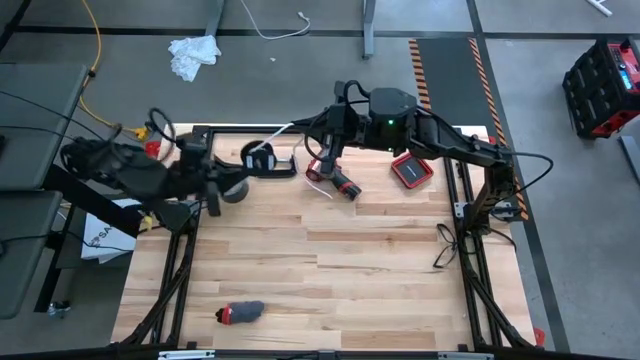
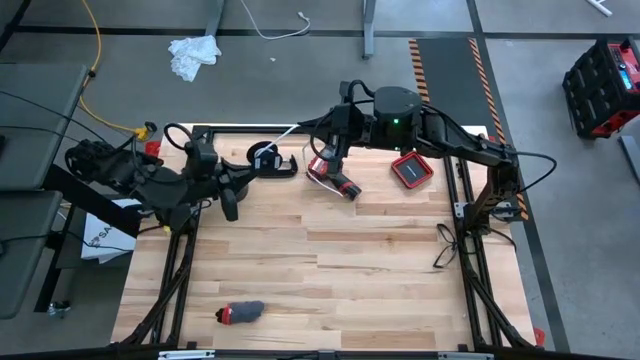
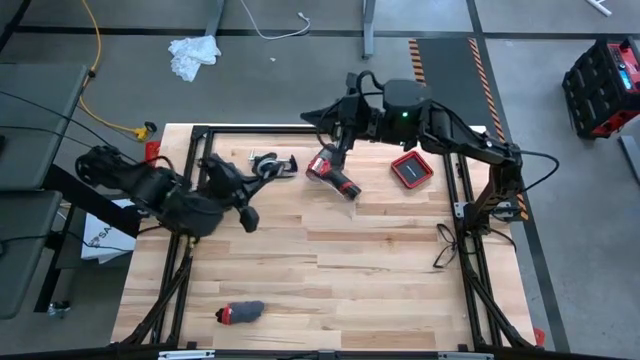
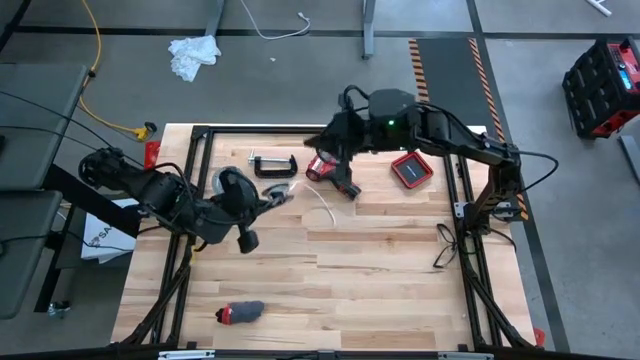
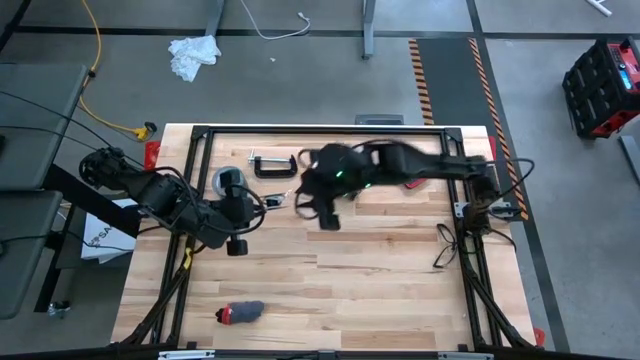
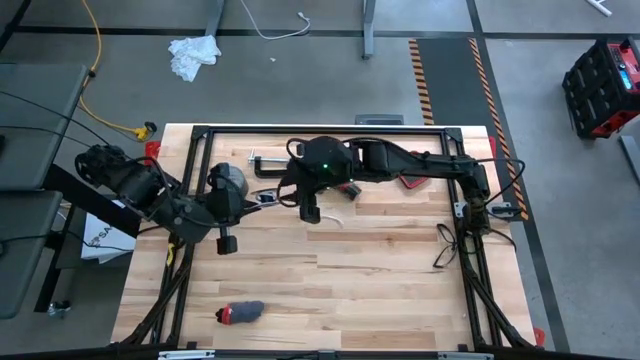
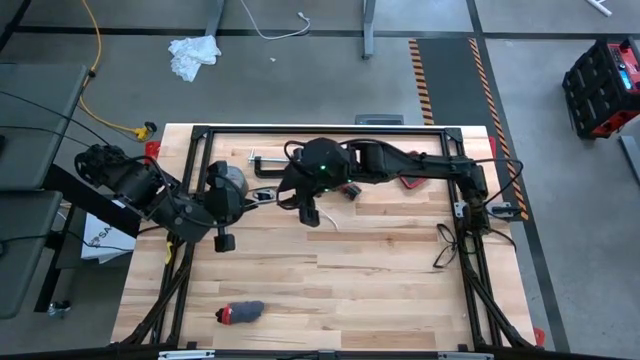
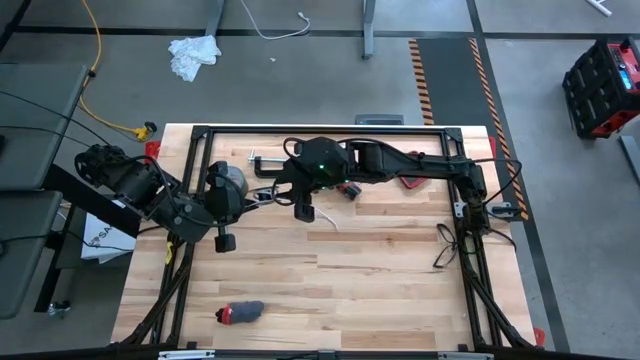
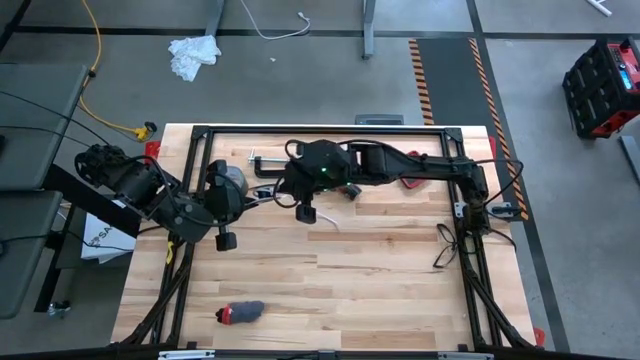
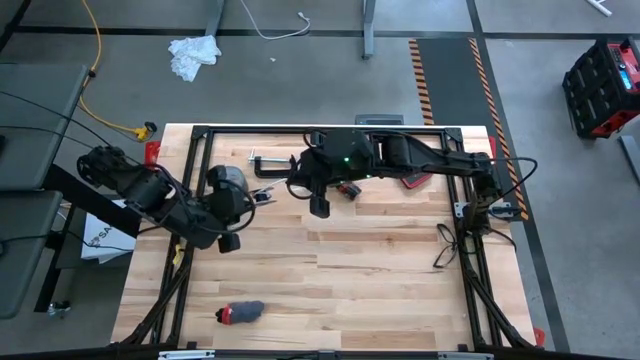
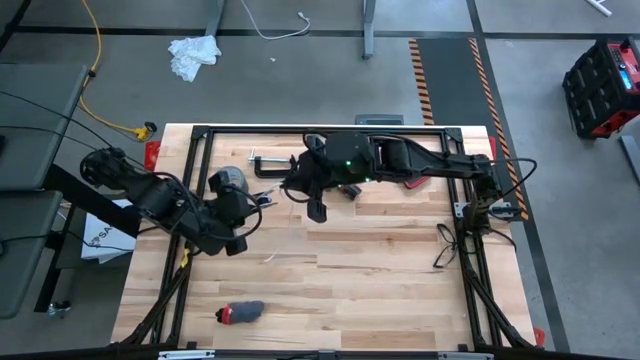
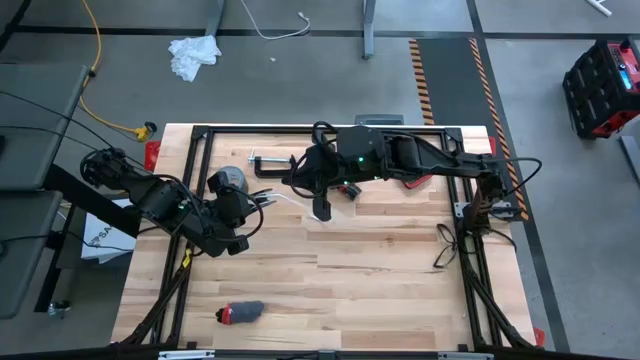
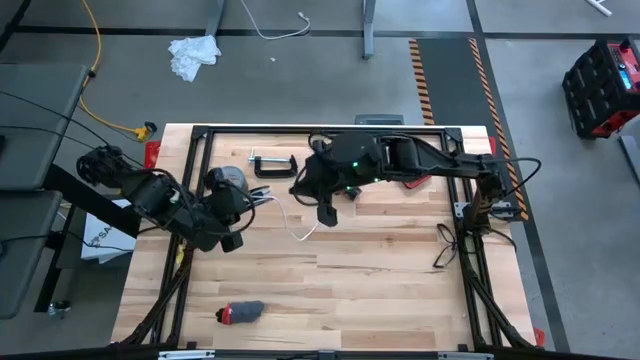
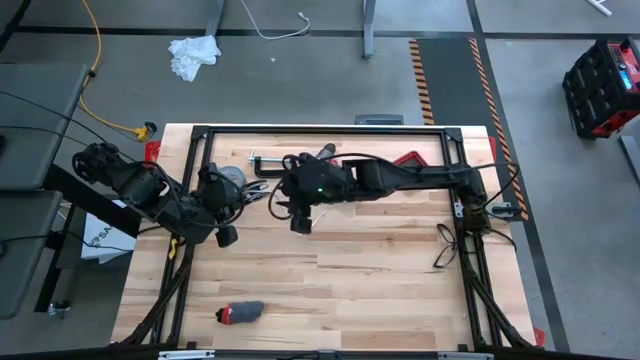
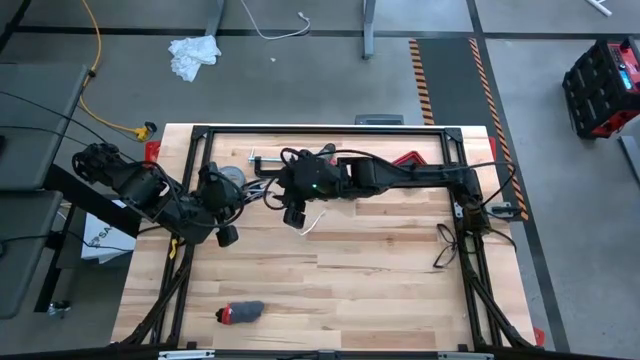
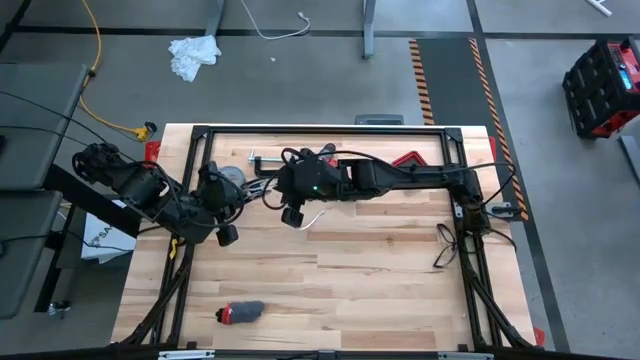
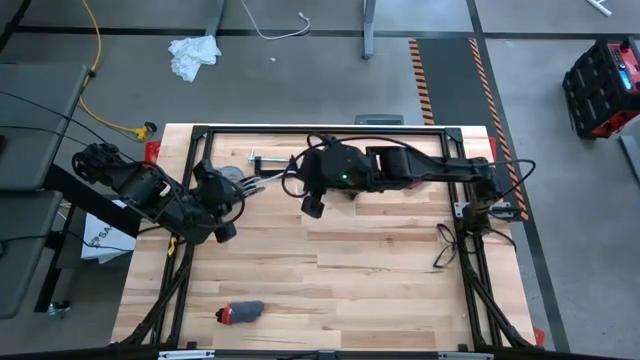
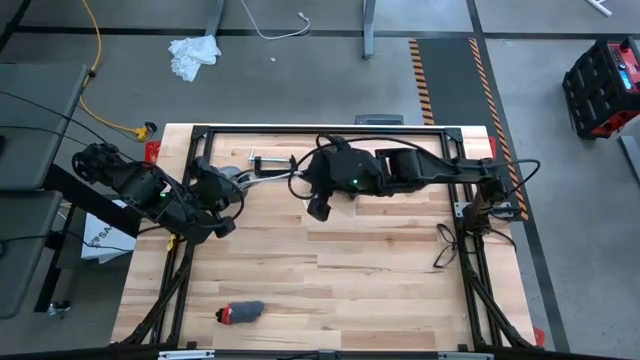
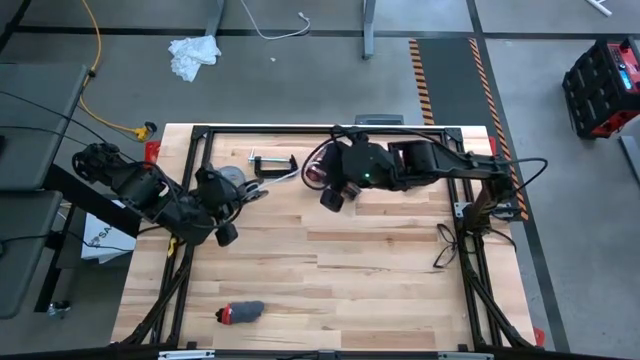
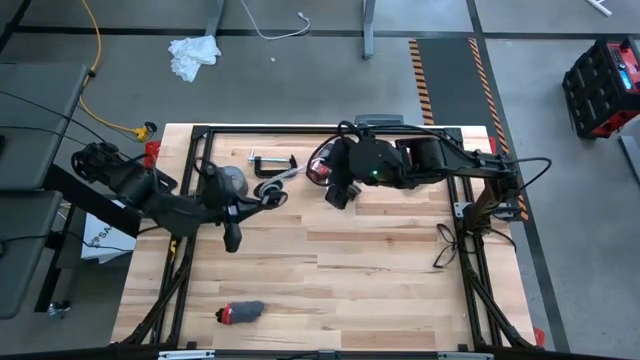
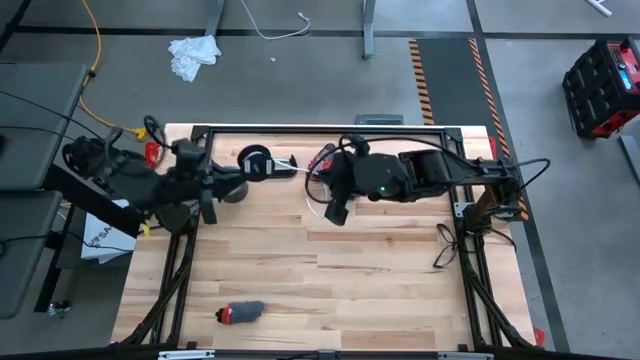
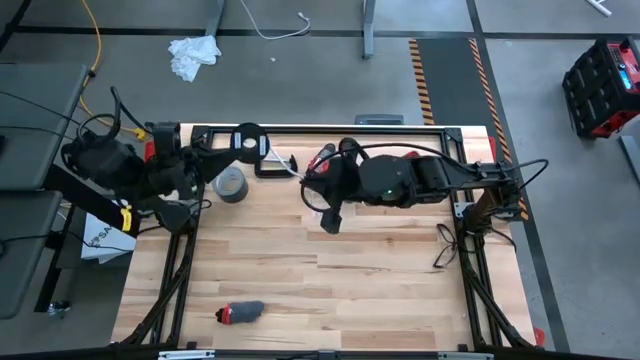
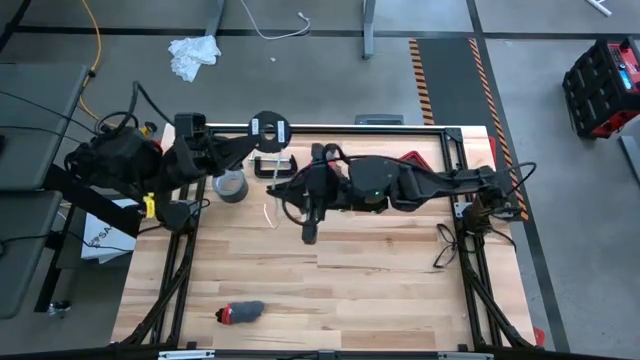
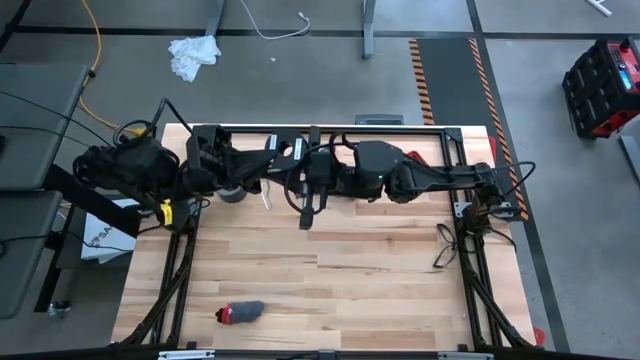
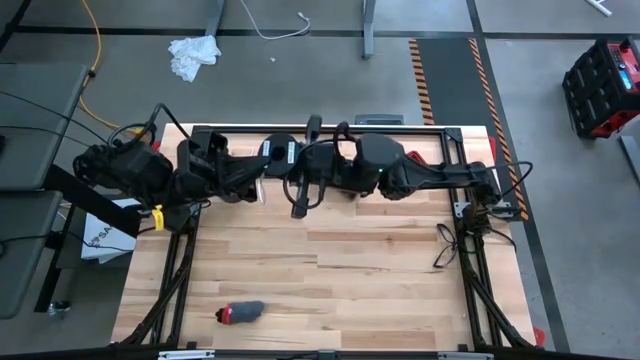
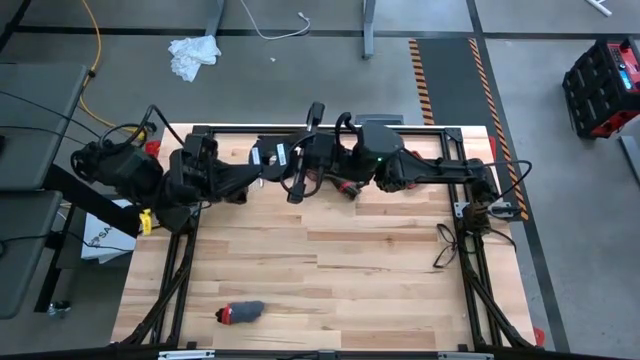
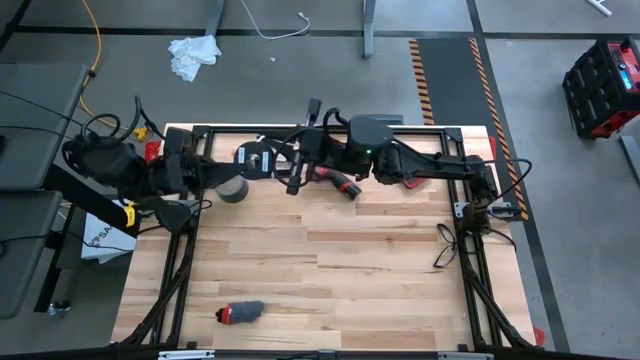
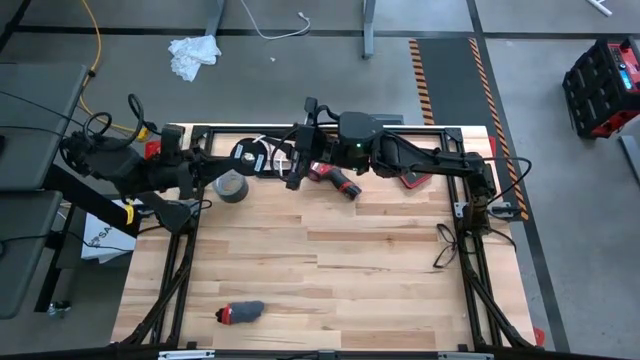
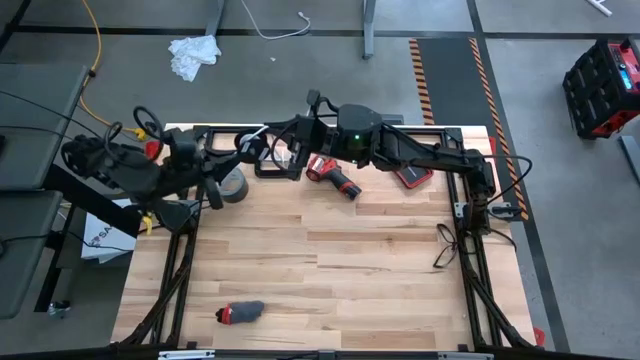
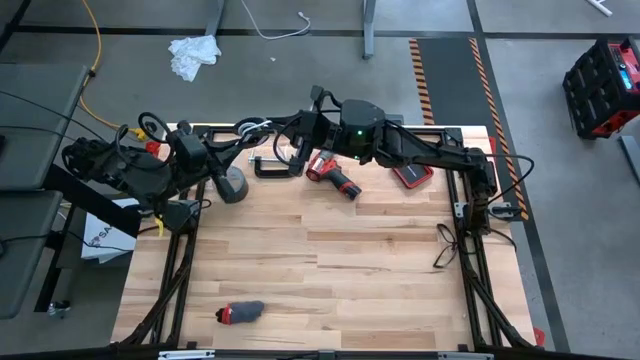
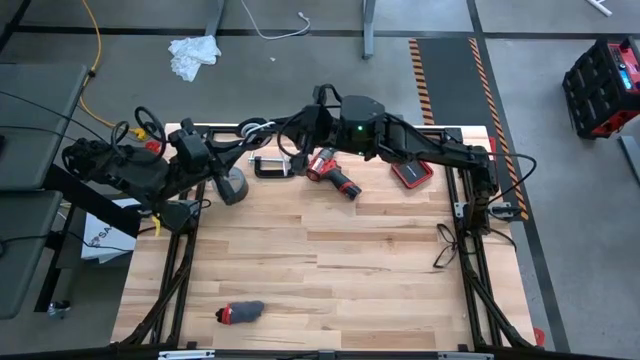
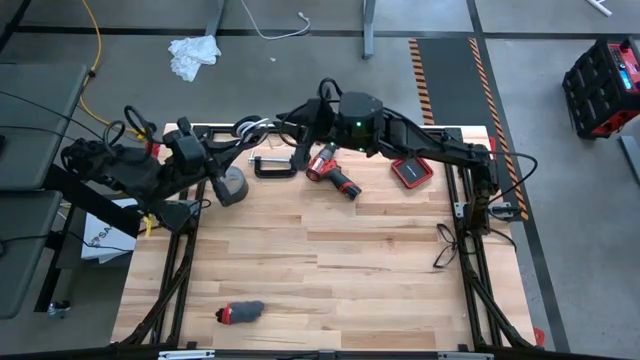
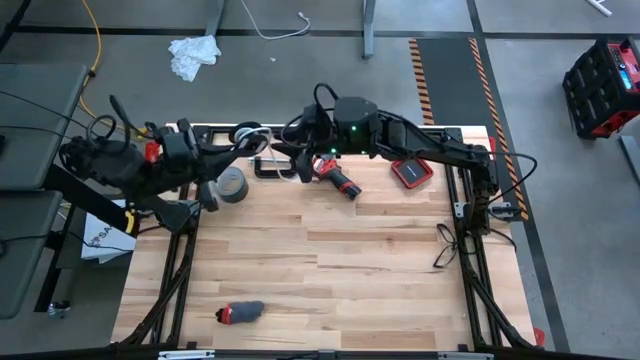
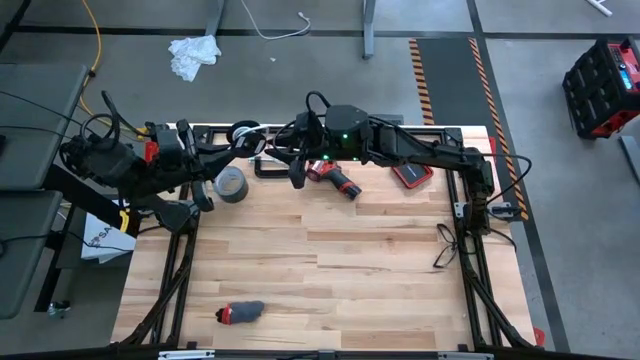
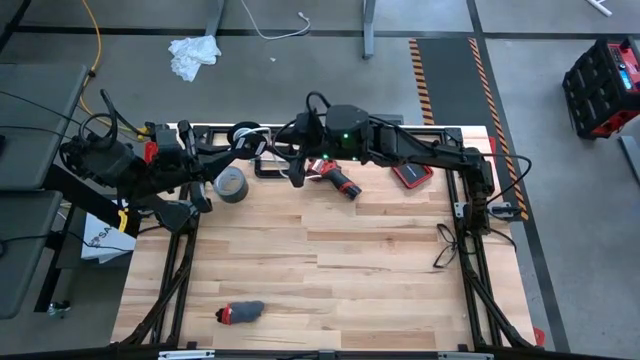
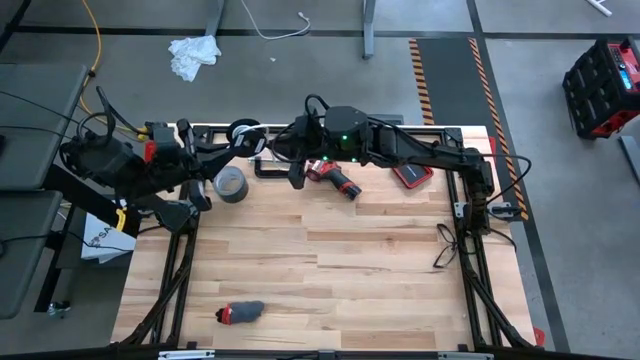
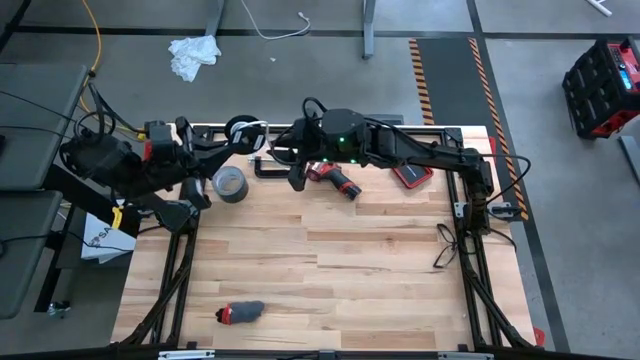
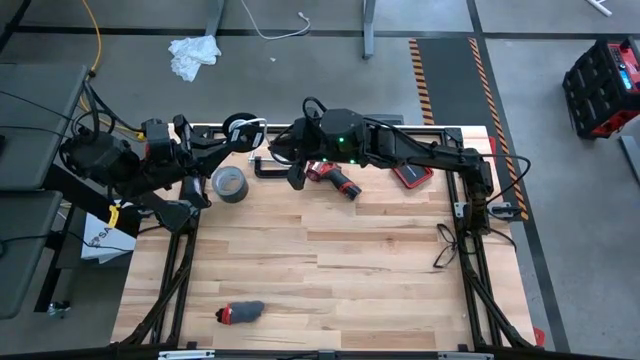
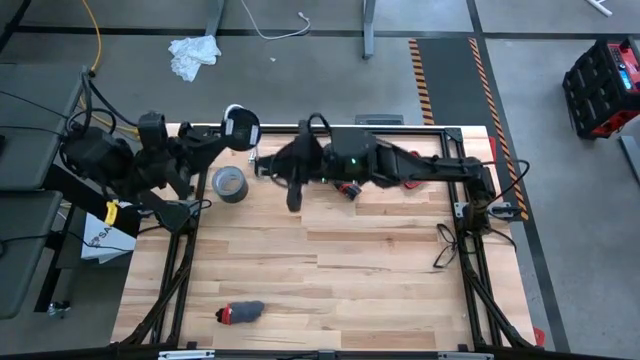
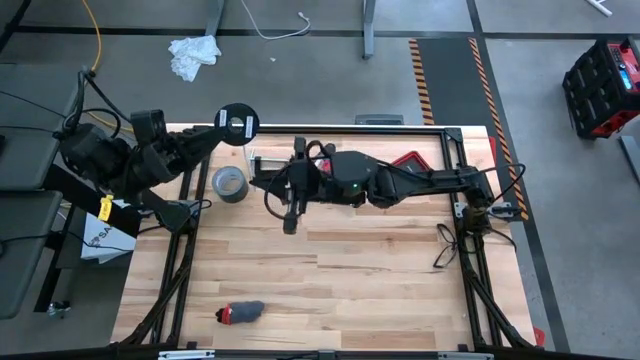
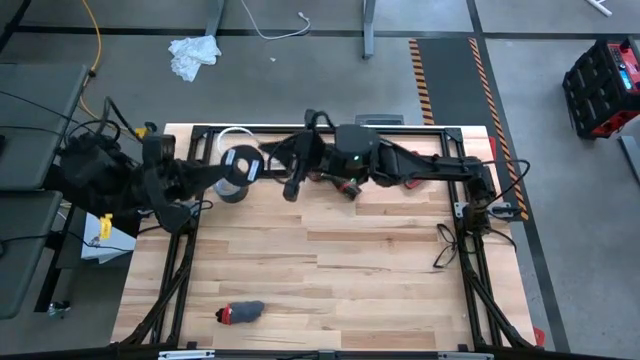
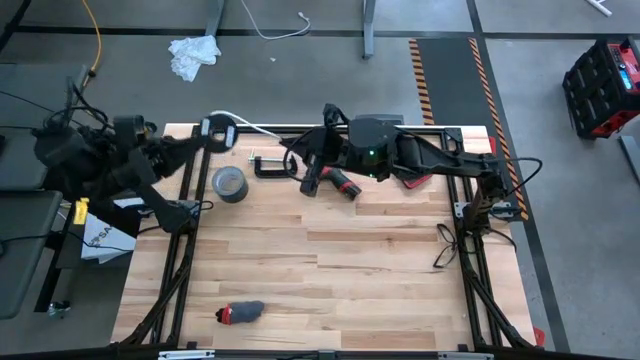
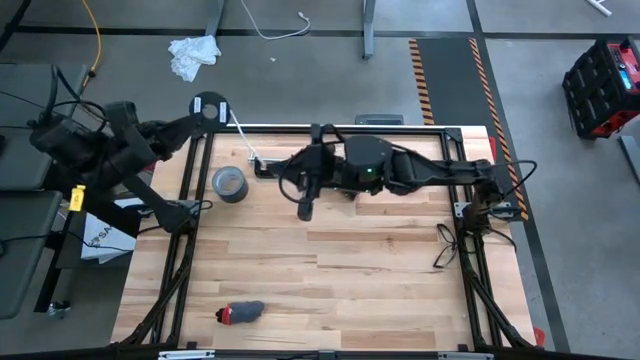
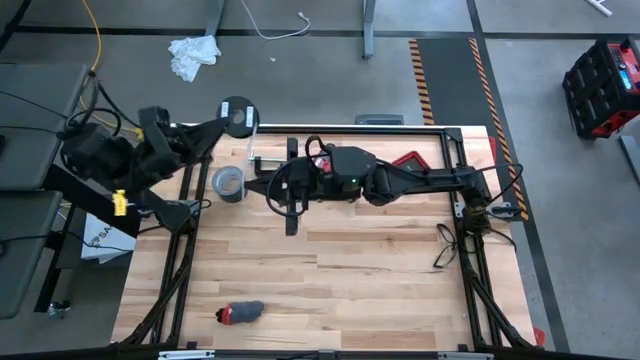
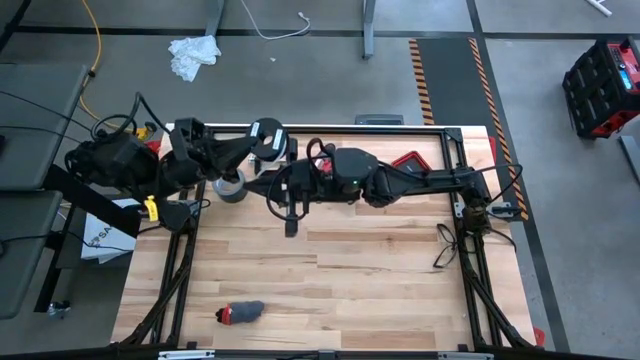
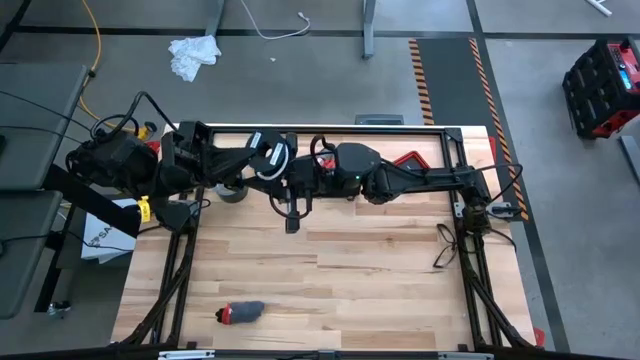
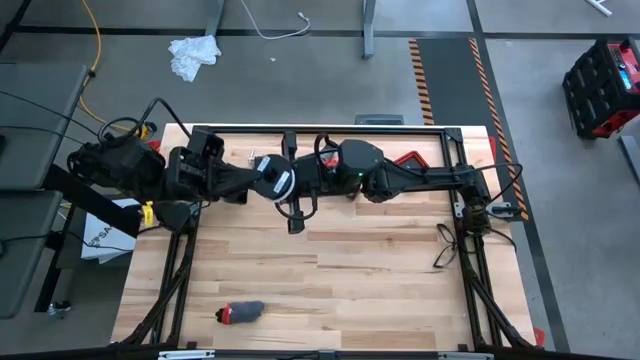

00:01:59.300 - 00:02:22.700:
Task: Coil cords
Coil the white cable wire into the black spool
